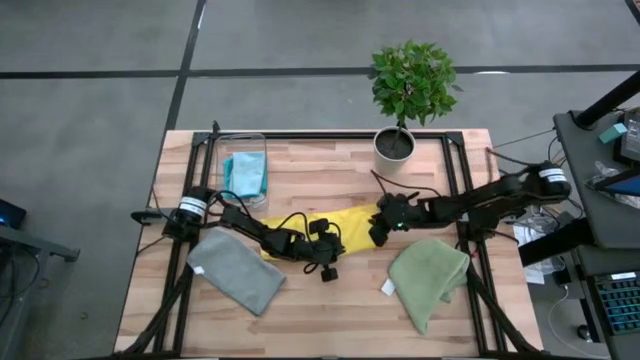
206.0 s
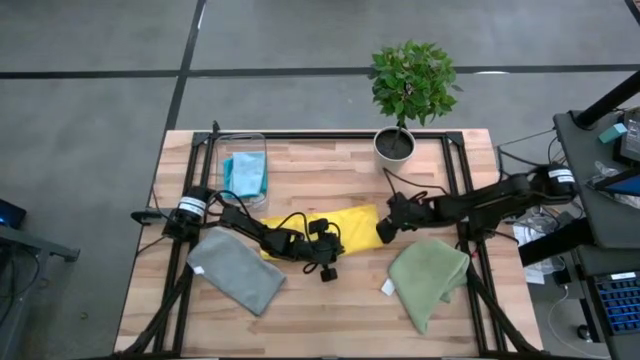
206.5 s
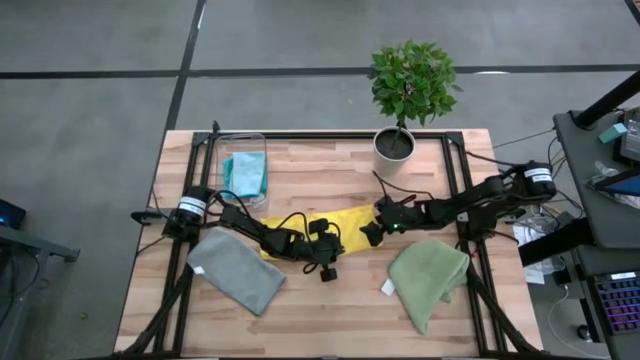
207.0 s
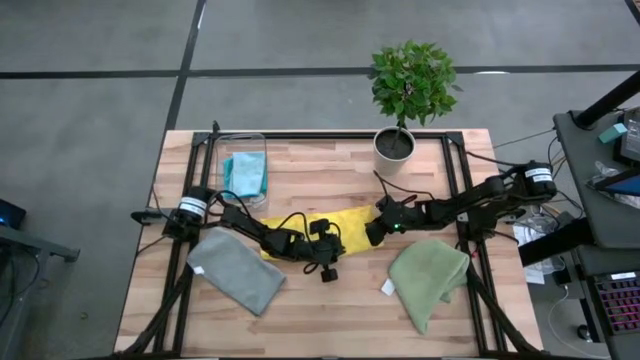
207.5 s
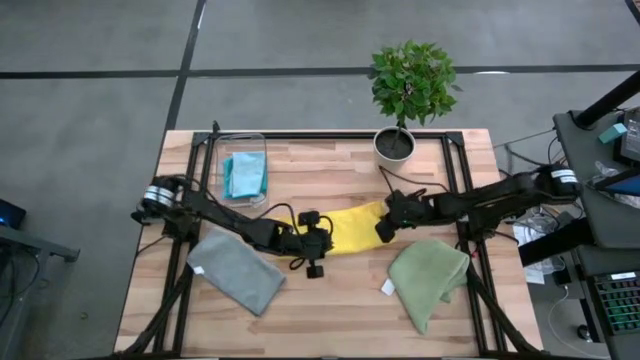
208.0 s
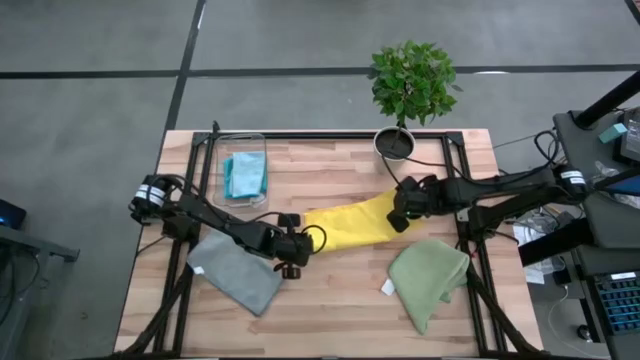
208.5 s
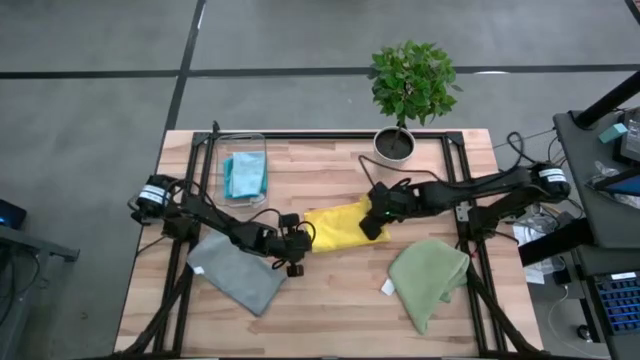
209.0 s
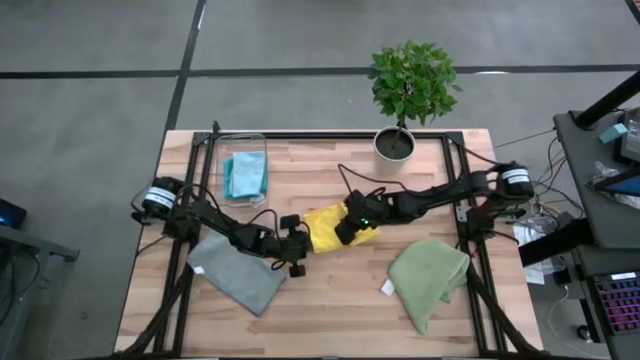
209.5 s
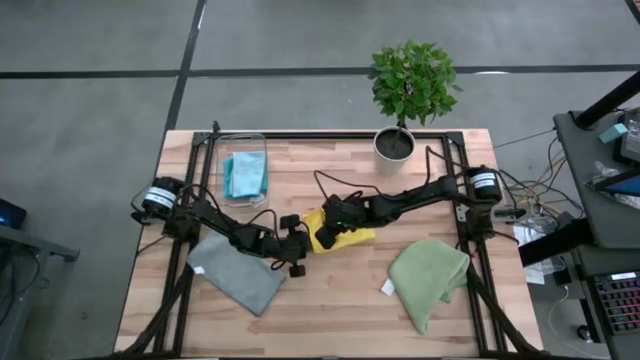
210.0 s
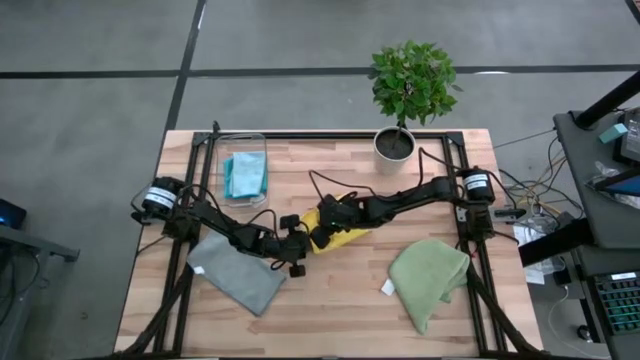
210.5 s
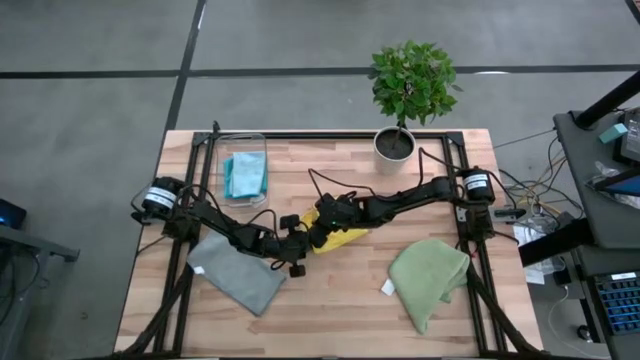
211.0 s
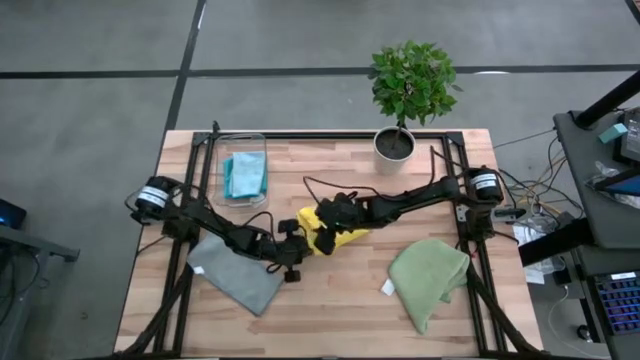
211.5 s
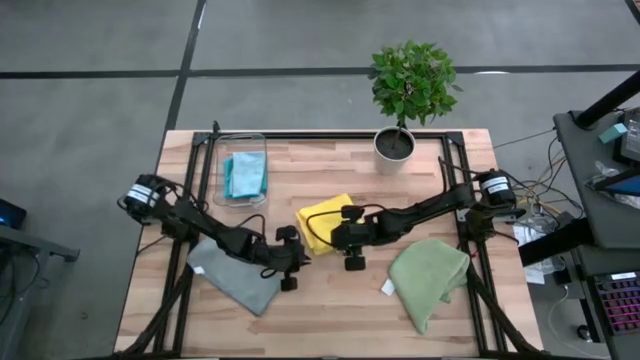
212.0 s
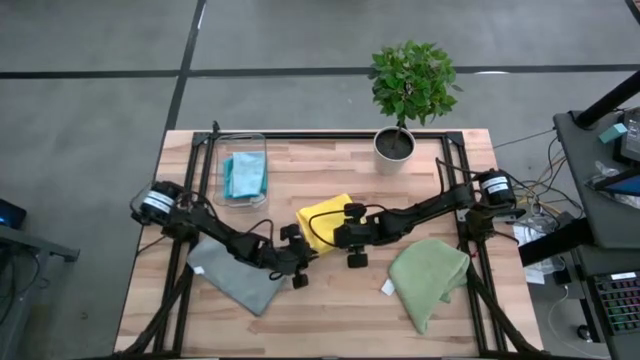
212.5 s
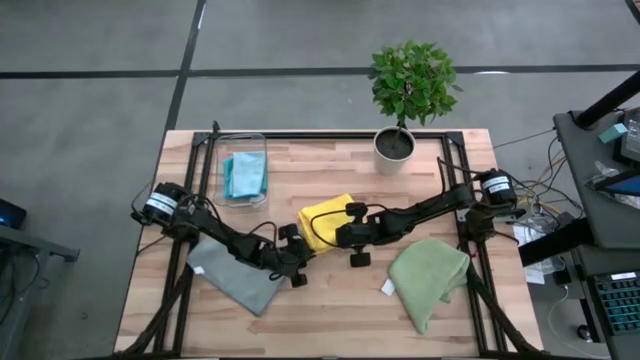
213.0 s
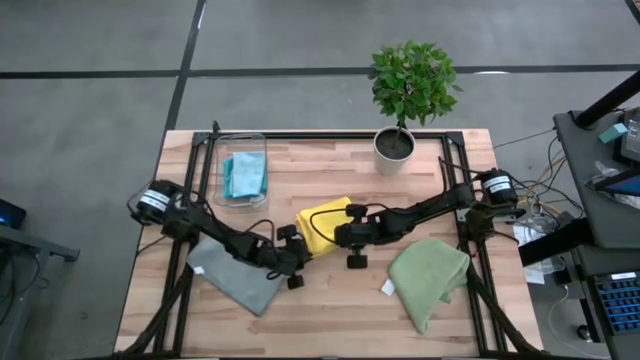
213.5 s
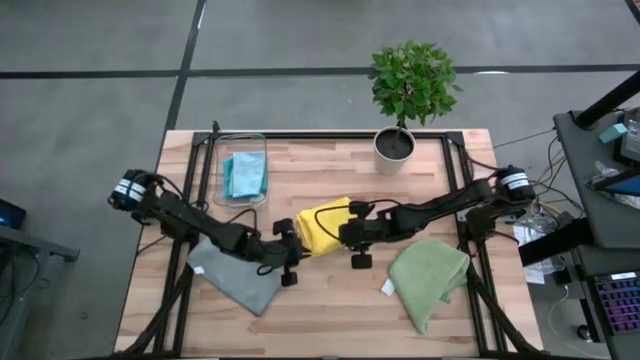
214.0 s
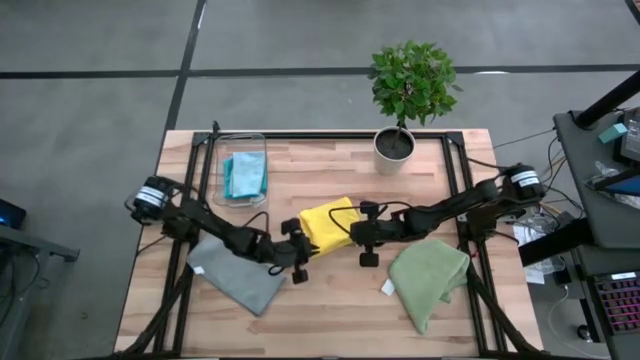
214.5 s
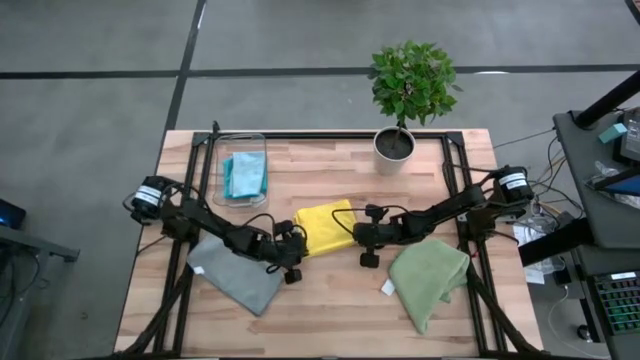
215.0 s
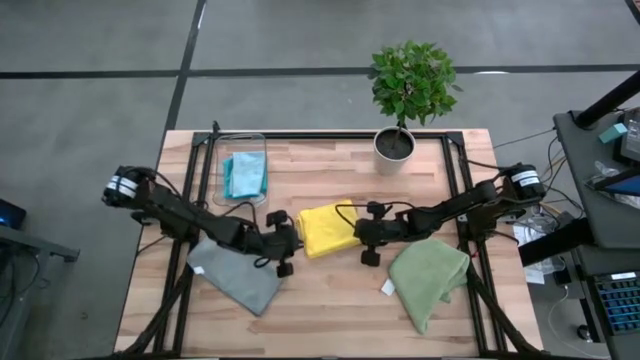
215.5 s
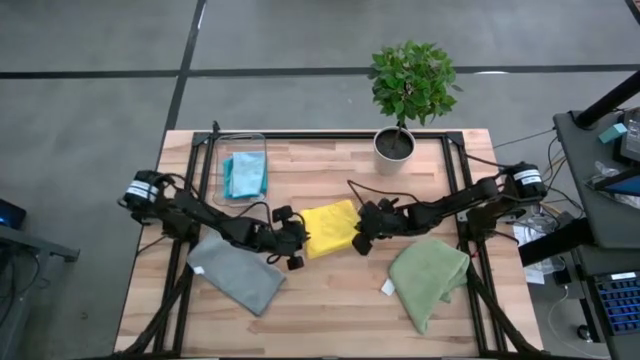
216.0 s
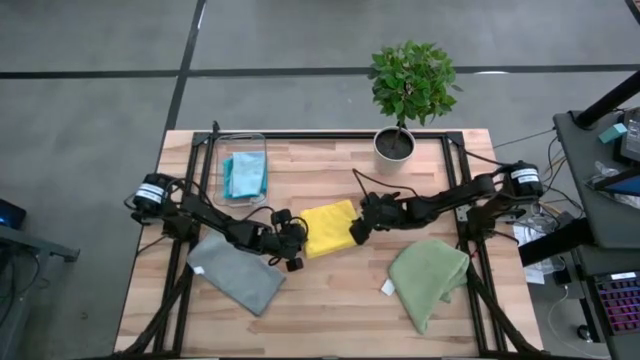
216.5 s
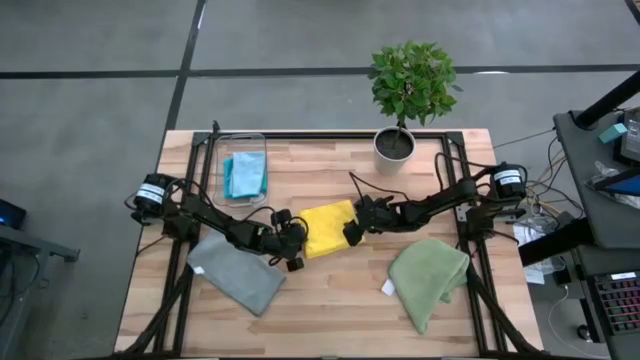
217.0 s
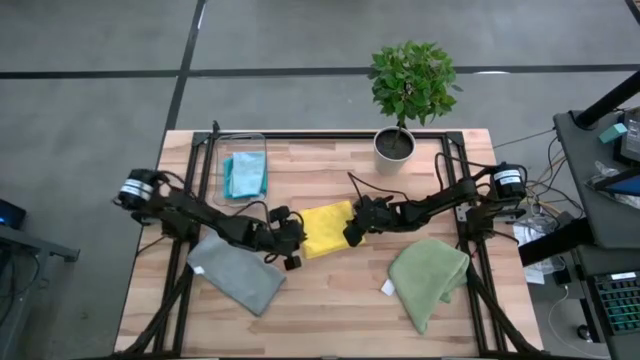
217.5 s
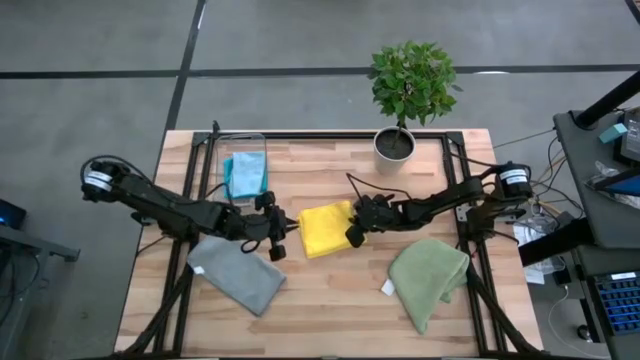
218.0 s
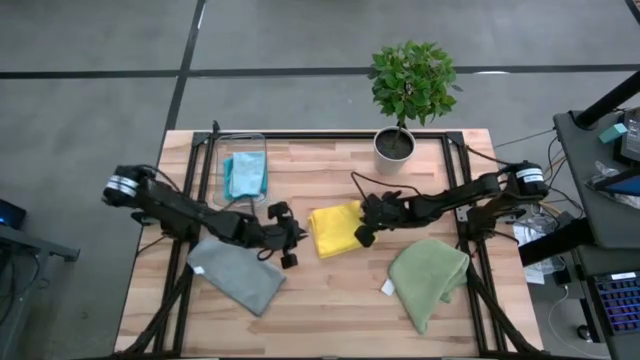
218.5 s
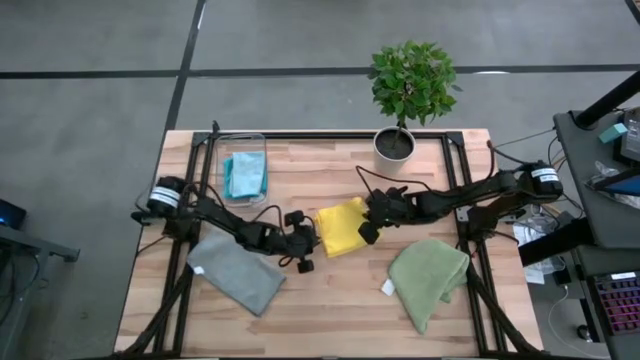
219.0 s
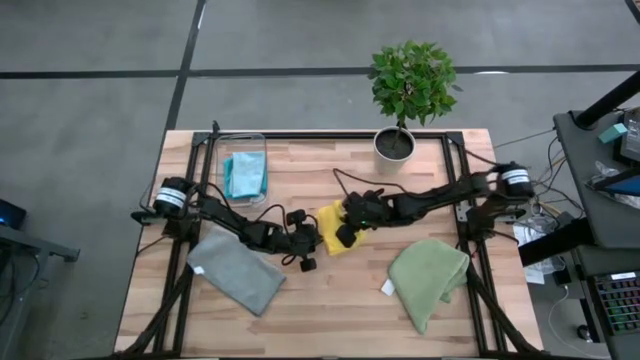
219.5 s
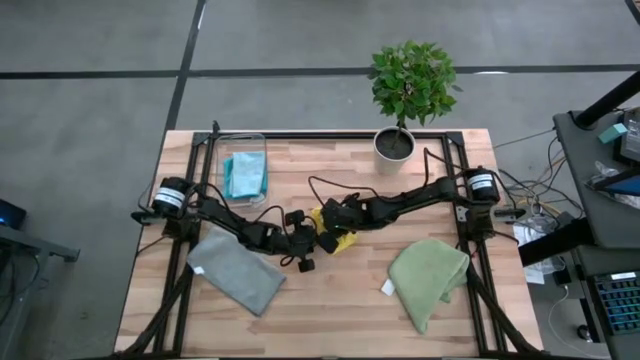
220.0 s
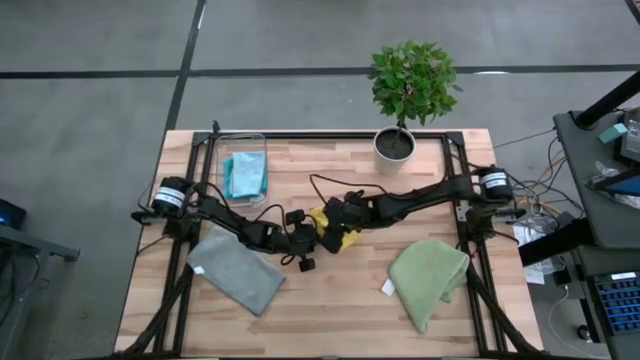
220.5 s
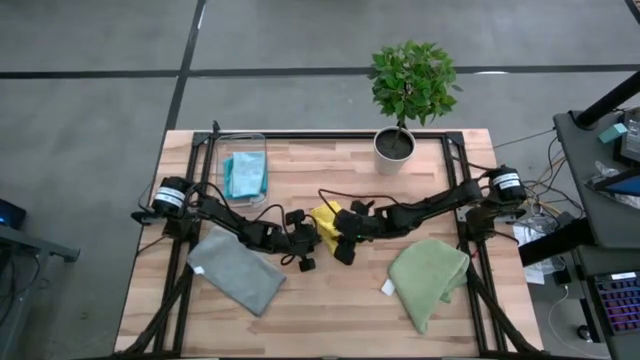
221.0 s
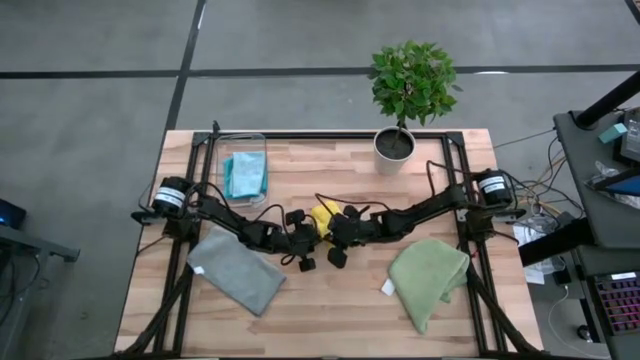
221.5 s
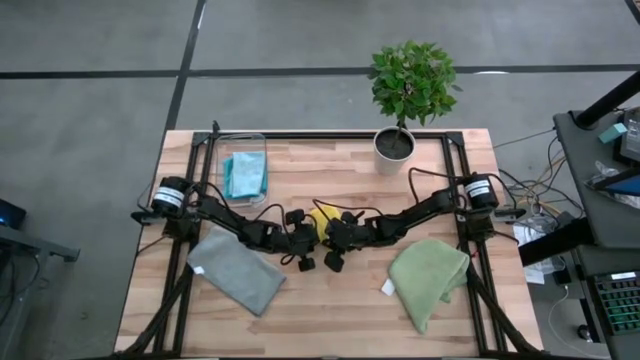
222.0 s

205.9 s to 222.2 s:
Task: Fold microfiber towels
Fold the yellow microfiber towel

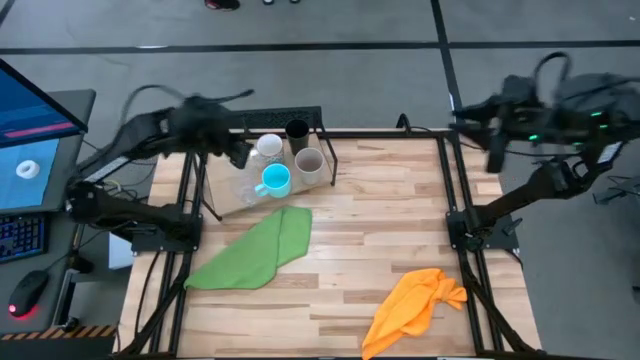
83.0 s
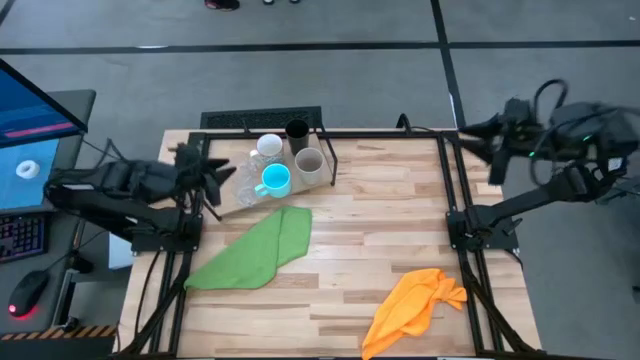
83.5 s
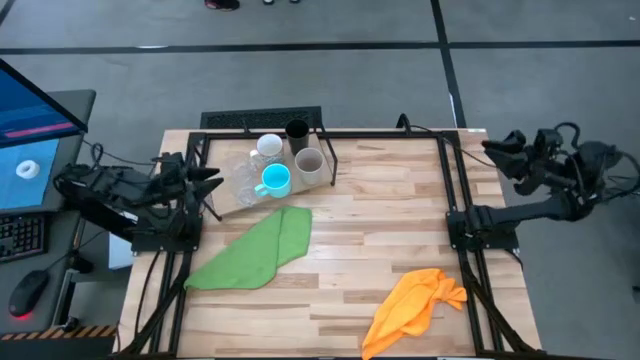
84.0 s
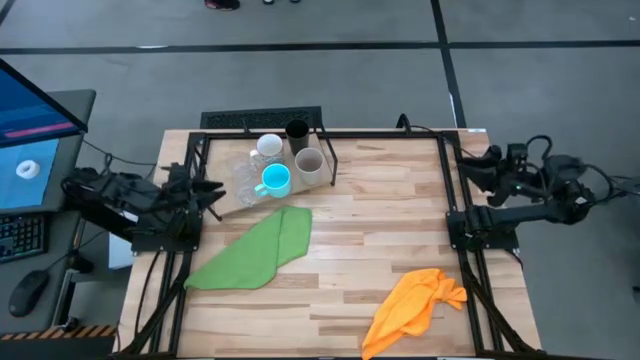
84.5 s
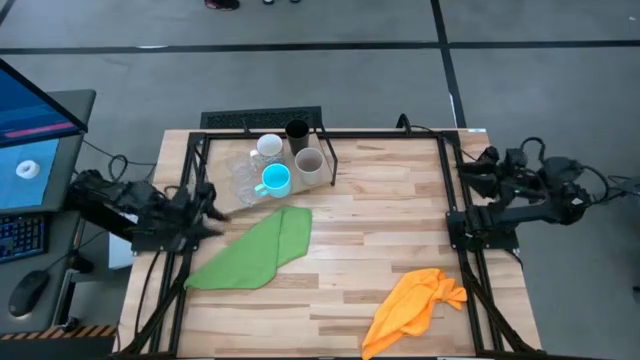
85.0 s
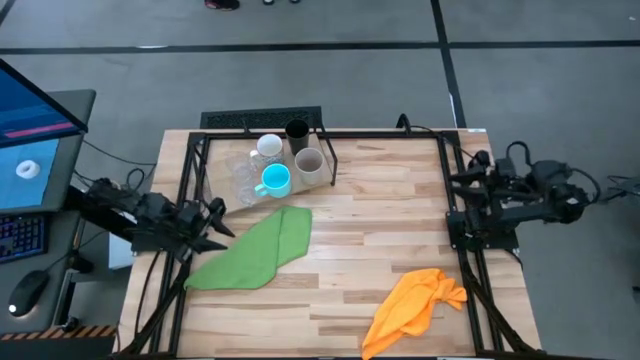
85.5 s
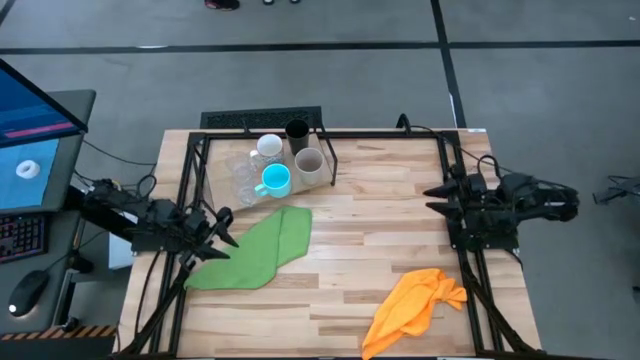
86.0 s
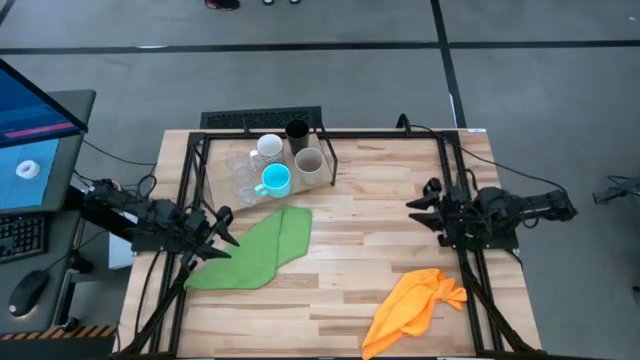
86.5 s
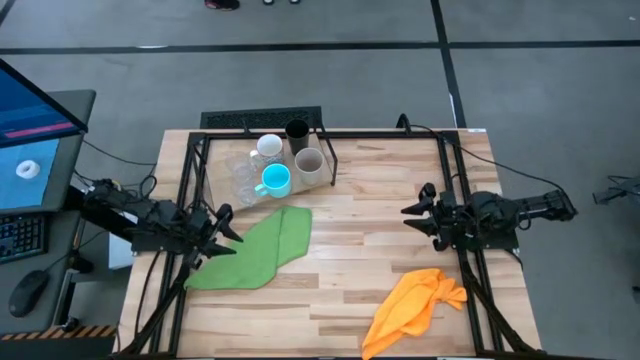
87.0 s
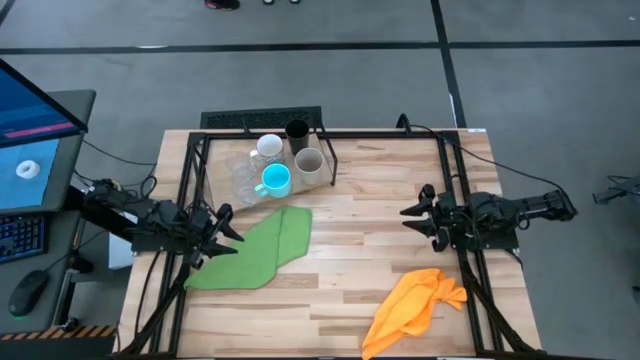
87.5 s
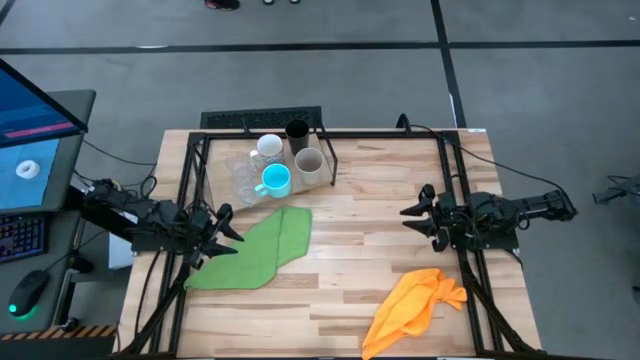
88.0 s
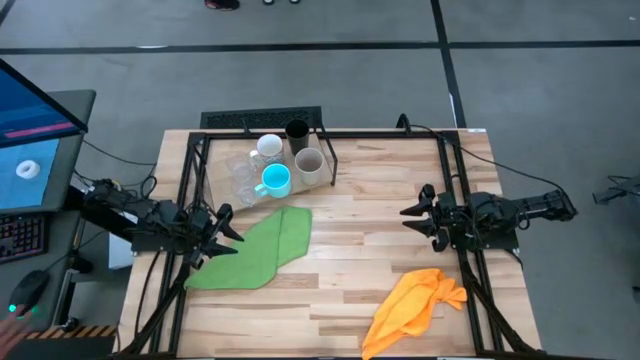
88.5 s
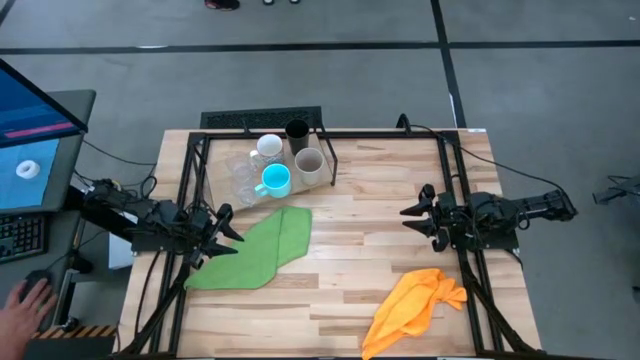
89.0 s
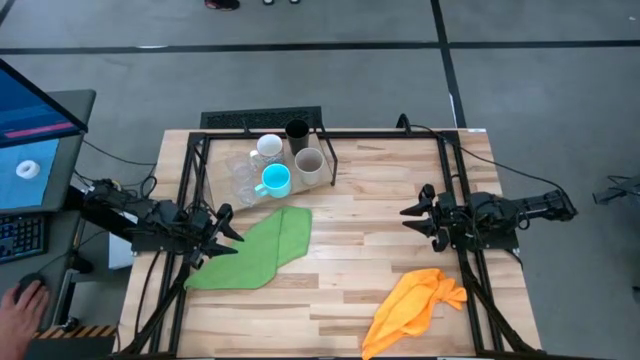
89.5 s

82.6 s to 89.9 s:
Task: Stack small to large cups/mugs on shelf
Return to Home Position
